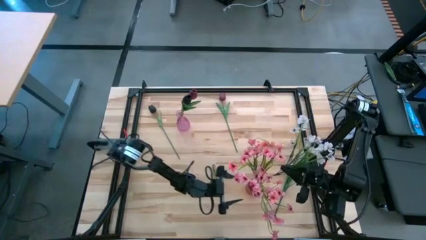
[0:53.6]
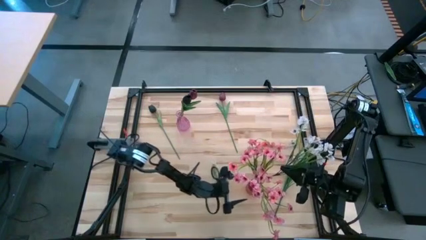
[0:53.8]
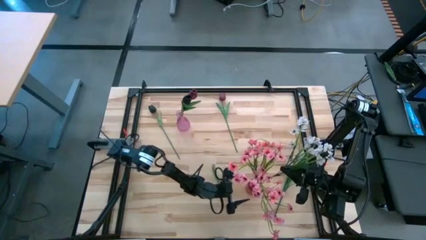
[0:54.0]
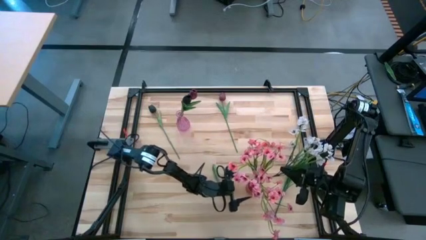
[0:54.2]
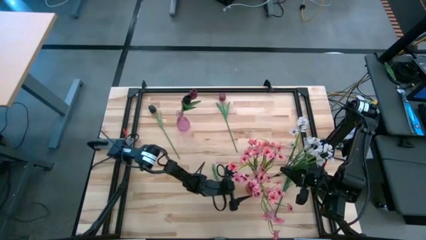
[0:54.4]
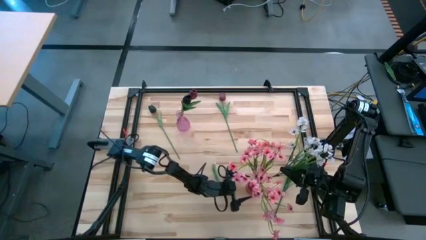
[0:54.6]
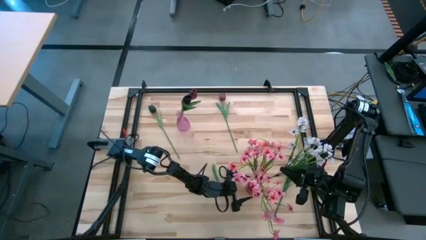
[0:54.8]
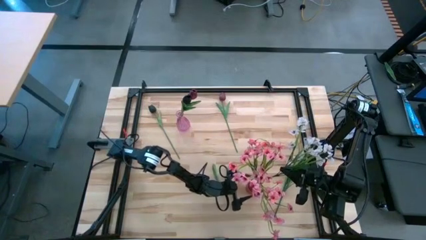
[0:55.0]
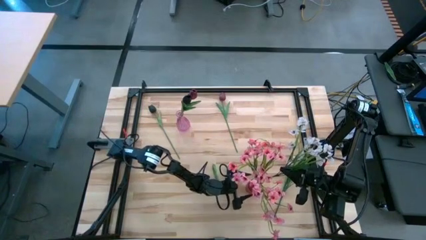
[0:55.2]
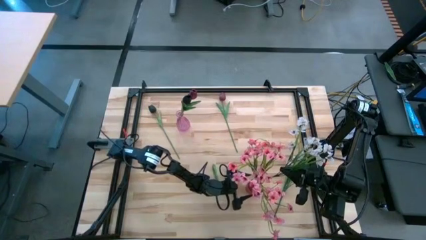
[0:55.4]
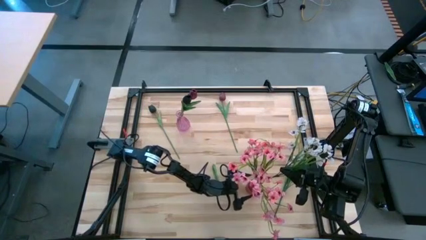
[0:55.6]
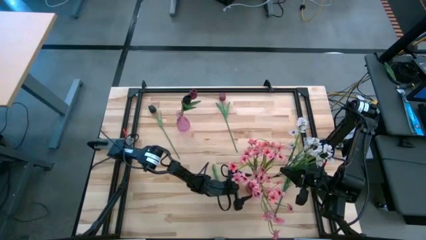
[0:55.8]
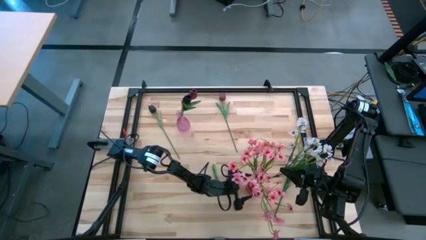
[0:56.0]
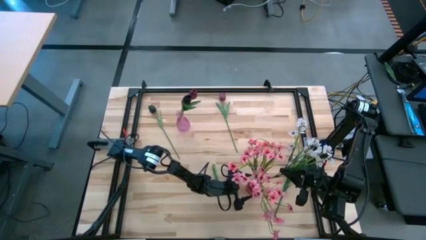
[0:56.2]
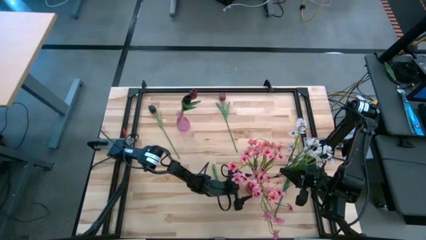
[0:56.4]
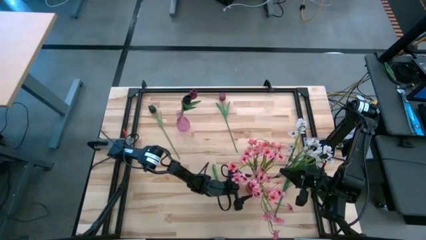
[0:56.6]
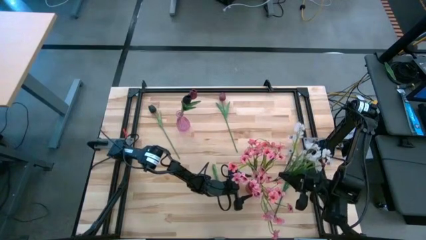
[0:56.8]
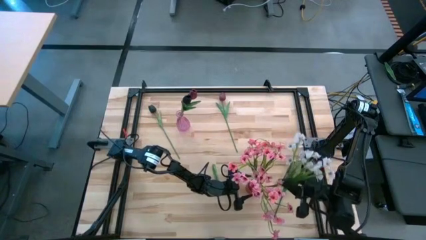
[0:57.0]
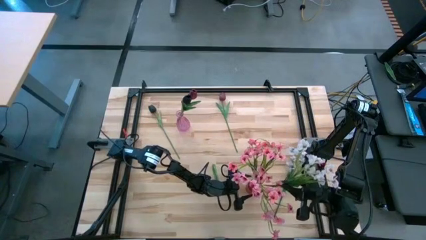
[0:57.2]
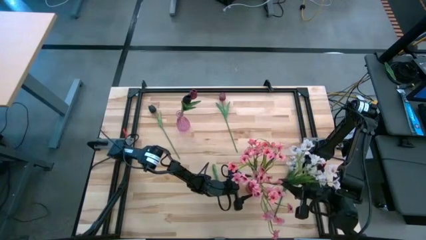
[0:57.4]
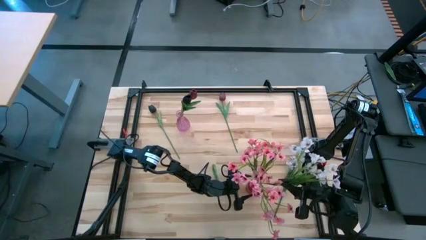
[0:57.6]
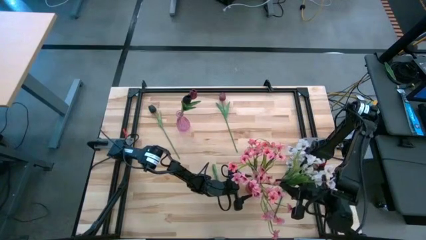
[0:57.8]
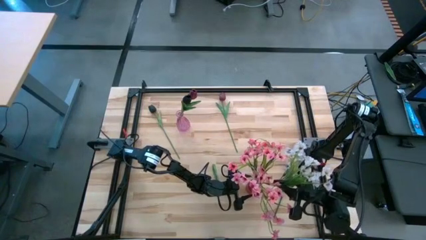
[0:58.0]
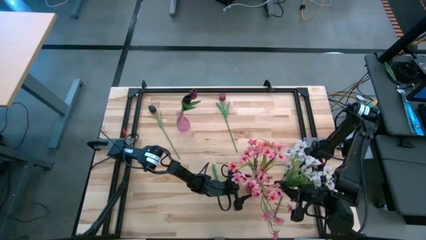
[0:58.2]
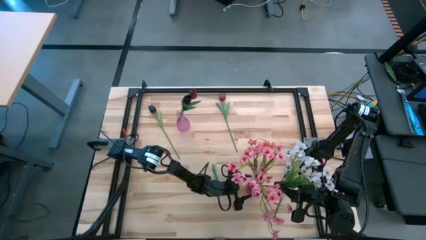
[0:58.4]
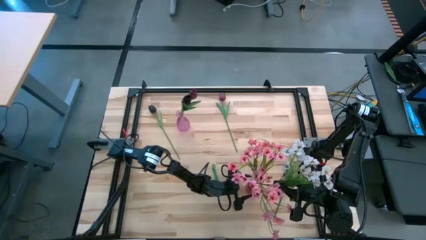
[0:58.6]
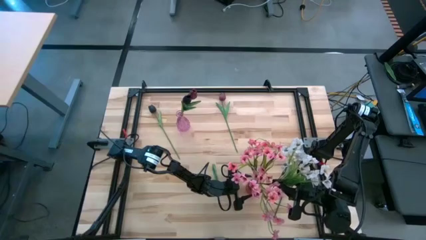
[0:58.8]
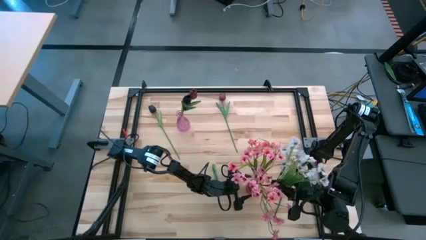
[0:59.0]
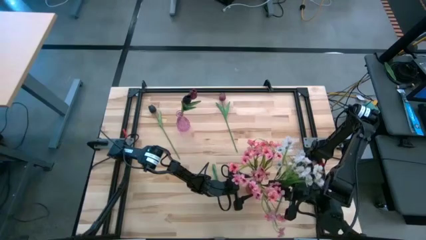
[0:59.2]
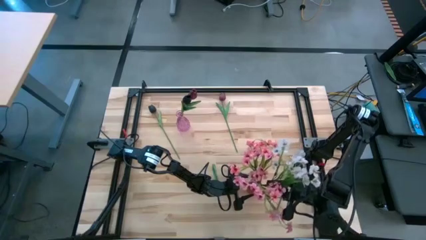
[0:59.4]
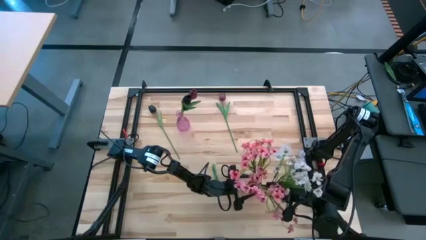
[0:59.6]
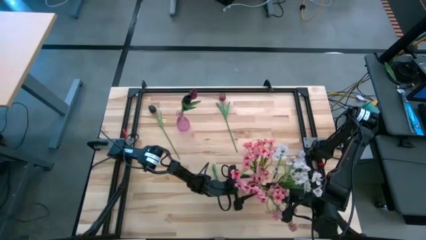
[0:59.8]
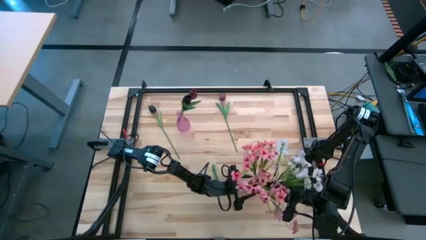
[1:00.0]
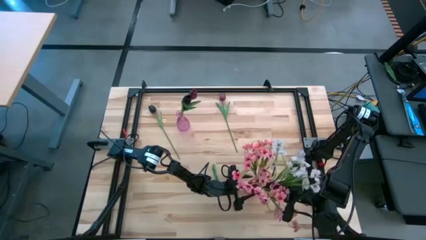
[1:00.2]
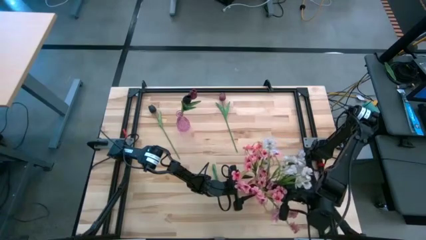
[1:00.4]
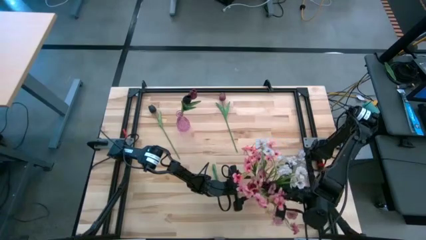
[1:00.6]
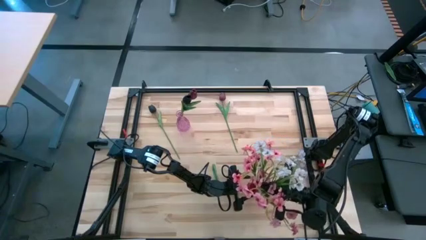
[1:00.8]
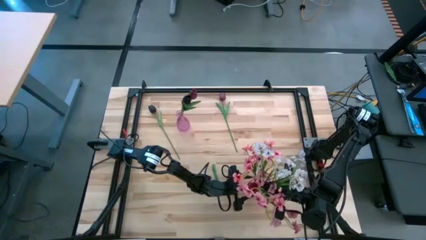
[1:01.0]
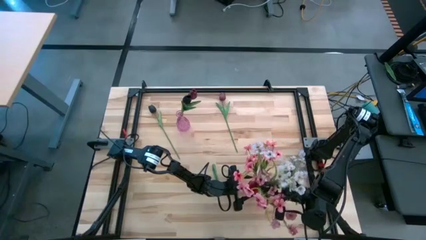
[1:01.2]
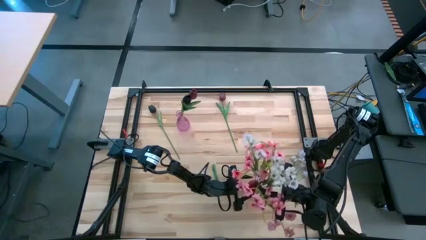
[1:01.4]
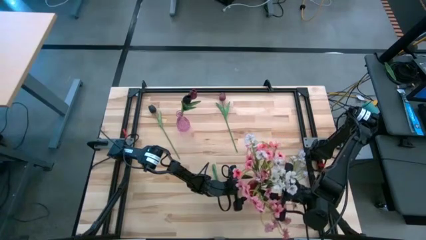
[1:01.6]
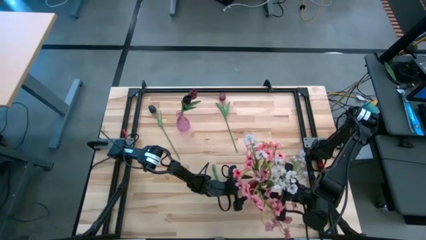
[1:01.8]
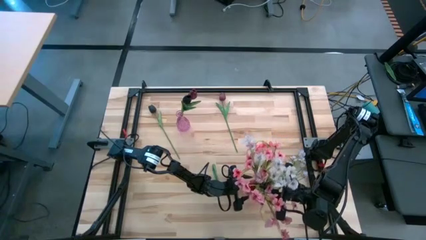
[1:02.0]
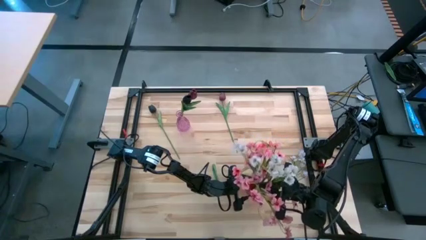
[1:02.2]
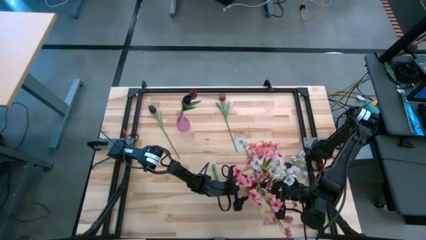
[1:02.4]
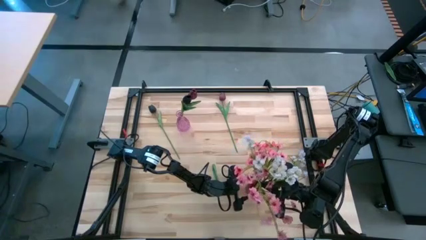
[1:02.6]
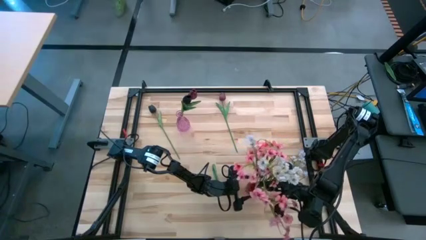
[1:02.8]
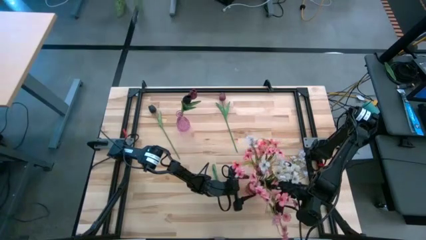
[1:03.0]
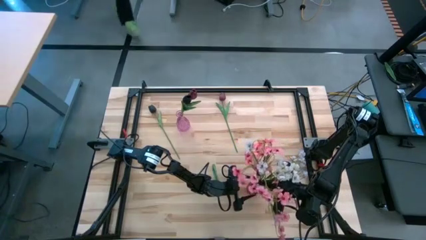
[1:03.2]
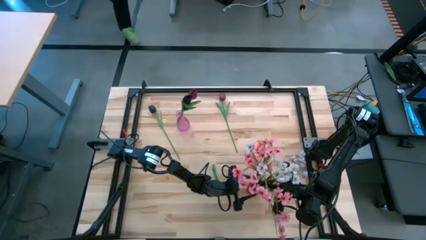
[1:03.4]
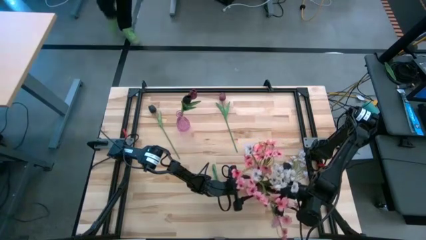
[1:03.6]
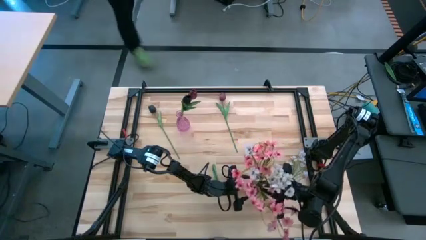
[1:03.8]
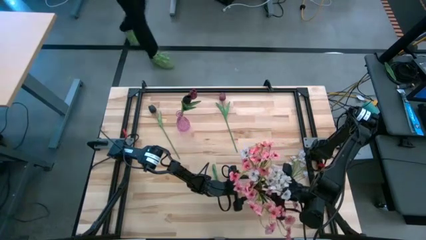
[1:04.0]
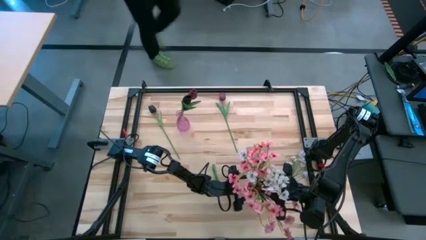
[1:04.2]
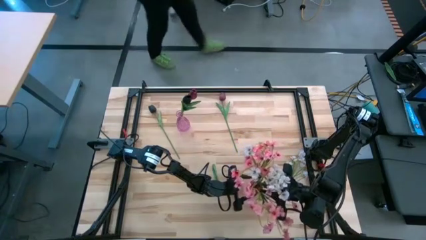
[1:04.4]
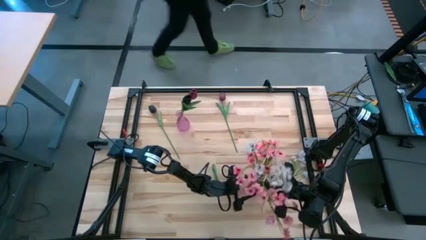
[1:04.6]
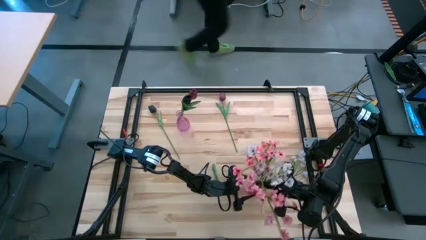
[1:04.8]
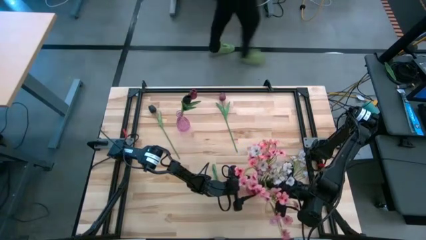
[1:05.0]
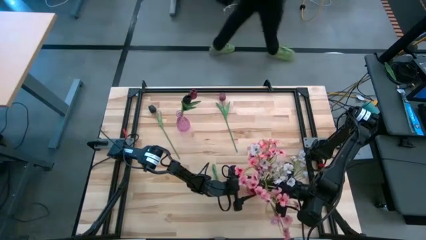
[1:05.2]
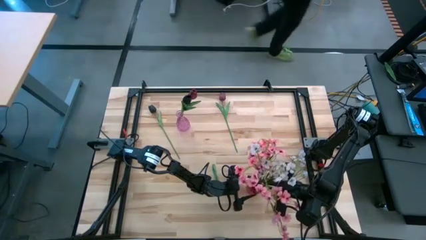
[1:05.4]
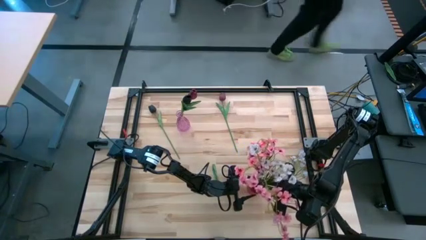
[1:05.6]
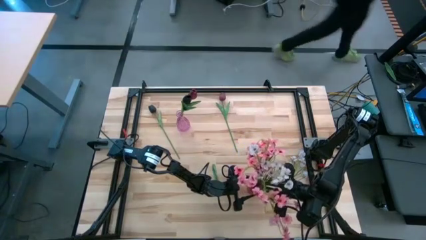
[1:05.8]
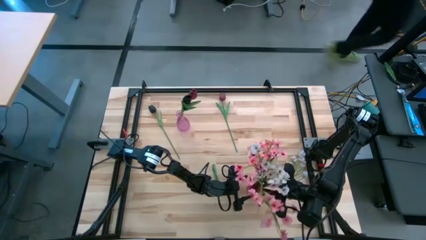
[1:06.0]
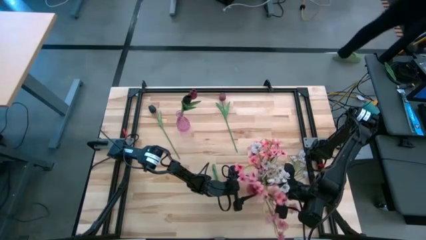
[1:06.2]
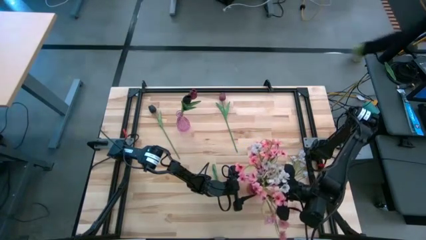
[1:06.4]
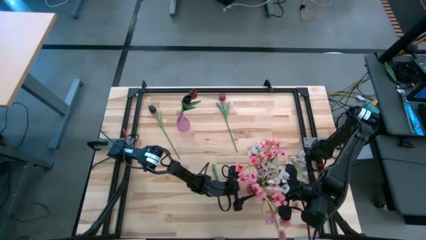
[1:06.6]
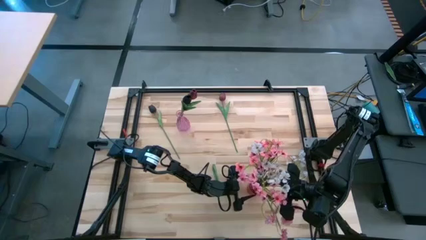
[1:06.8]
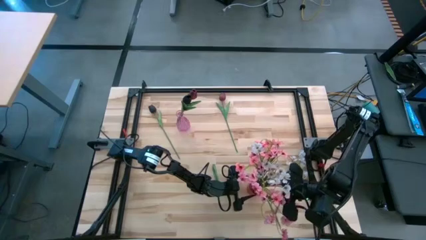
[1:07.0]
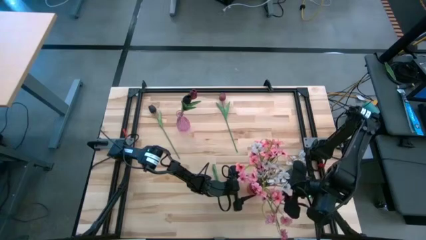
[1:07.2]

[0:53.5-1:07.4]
Task: Sort flowers into vase by color
Put the top white flowers into the red vase

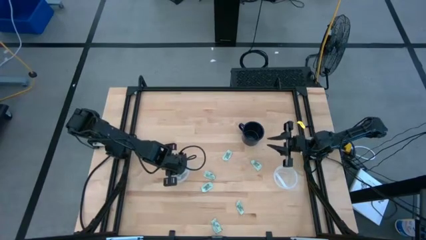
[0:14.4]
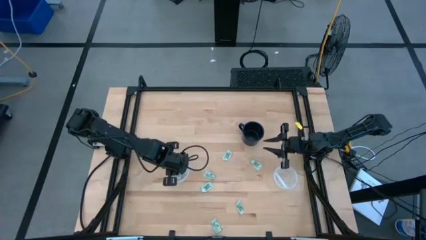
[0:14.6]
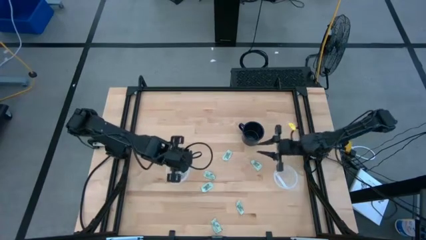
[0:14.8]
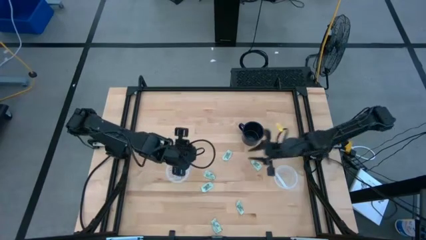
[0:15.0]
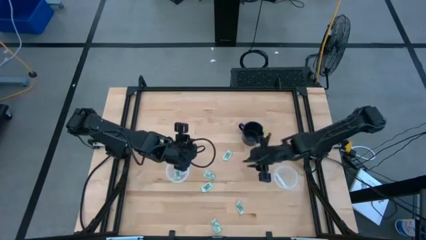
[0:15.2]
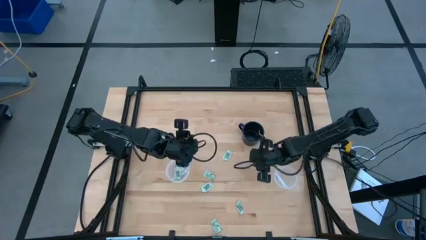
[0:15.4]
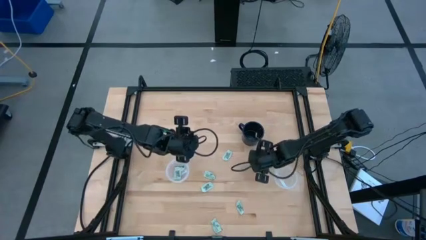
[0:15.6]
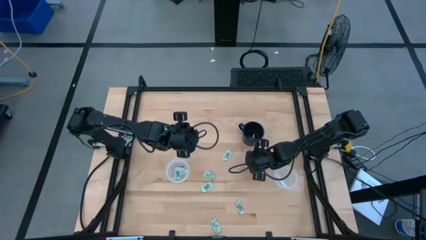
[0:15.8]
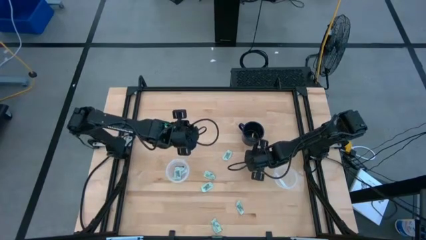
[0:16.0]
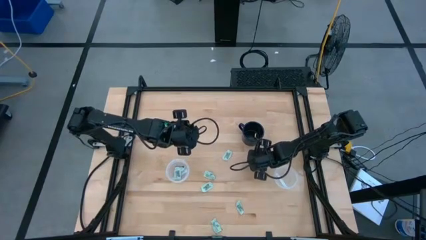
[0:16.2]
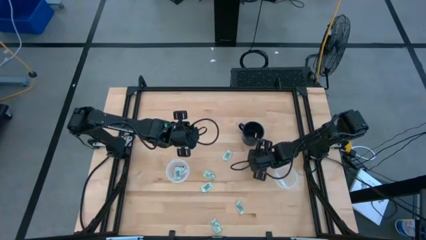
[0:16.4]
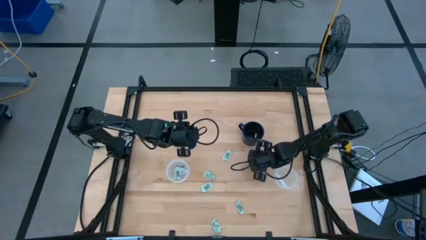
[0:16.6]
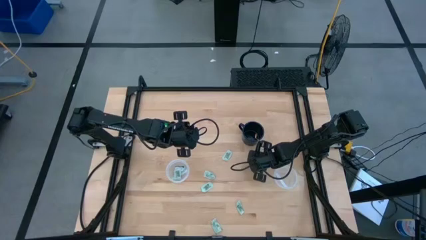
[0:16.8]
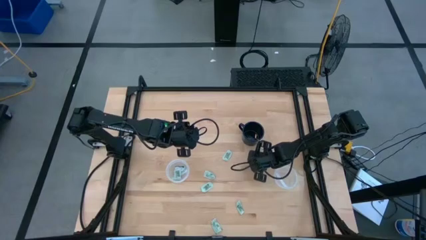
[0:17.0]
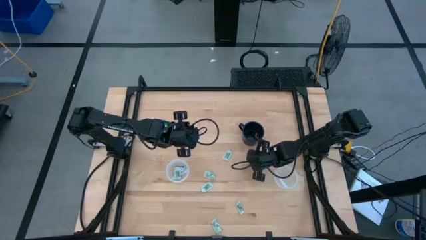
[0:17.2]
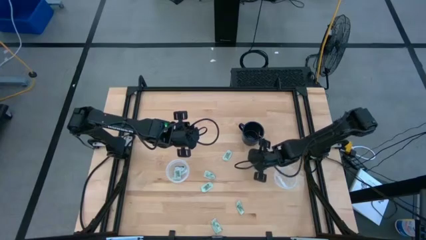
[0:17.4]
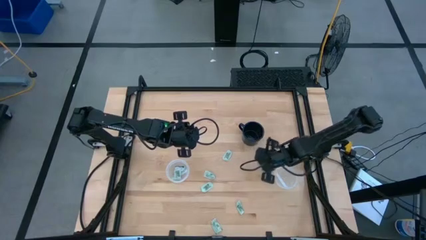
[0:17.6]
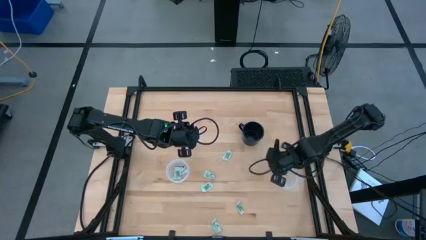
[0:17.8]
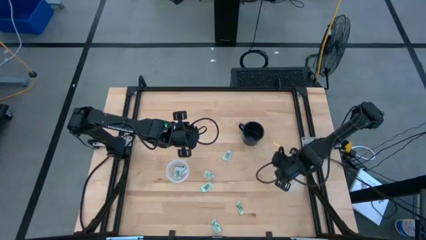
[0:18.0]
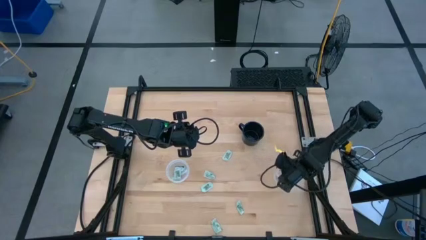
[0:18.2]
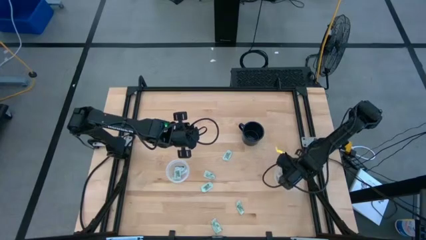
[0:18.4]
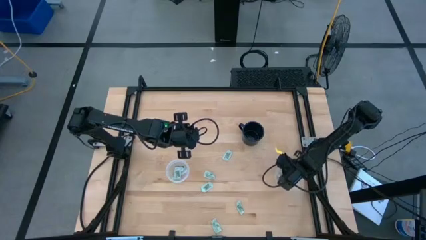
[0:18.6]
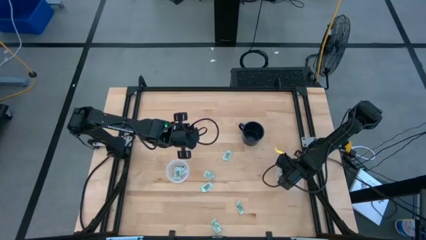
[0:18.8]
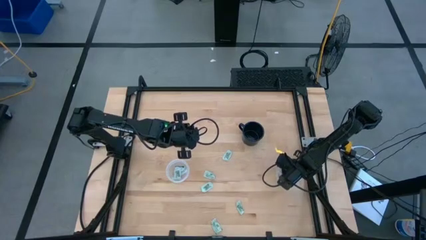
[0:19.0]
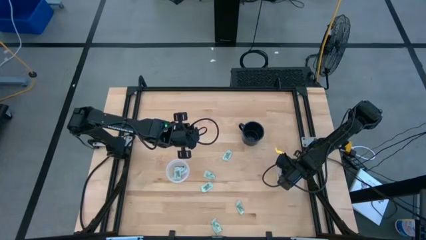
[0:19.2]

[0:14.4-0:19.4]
Task: Pick and place Stevia / Truvia into bins
Put the stevia packet into the right transparent plastic container
